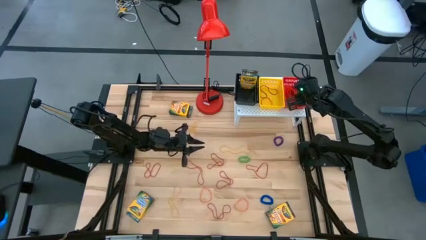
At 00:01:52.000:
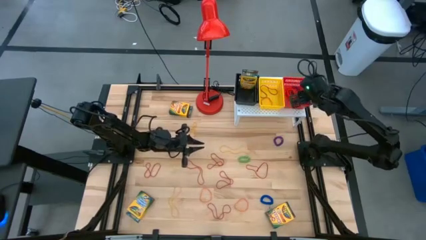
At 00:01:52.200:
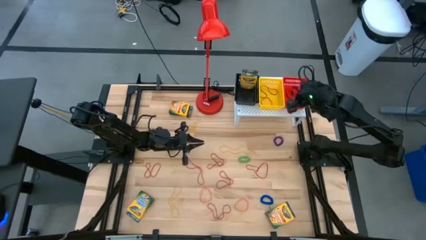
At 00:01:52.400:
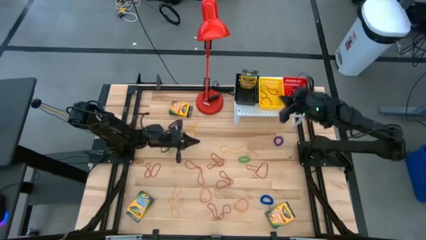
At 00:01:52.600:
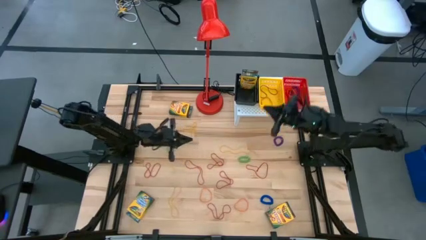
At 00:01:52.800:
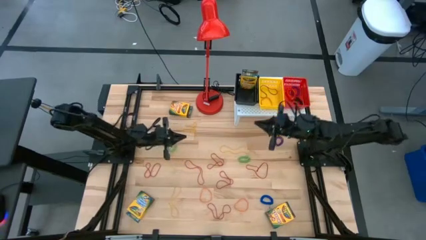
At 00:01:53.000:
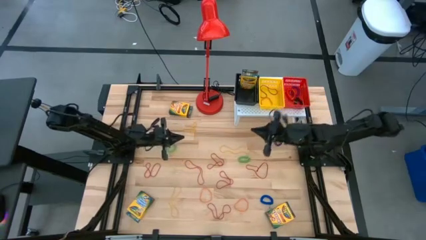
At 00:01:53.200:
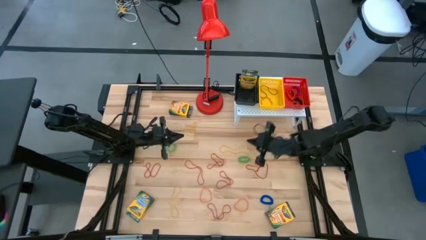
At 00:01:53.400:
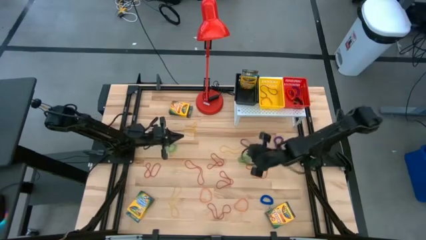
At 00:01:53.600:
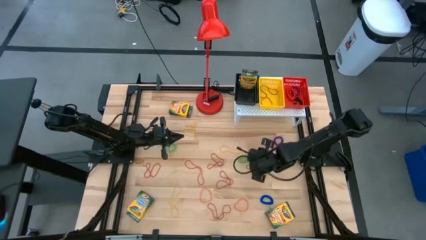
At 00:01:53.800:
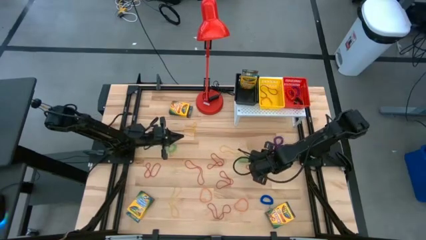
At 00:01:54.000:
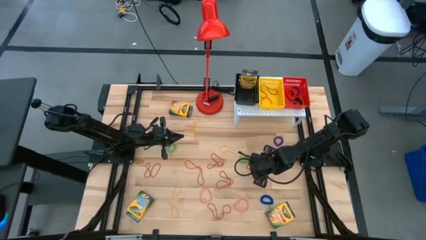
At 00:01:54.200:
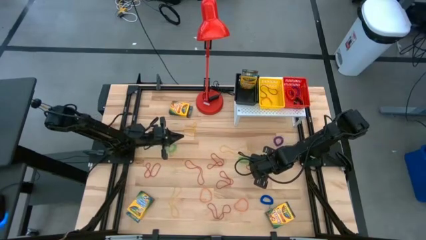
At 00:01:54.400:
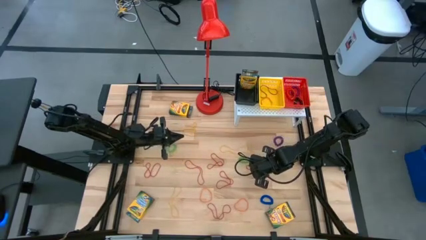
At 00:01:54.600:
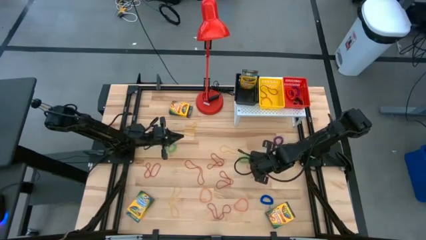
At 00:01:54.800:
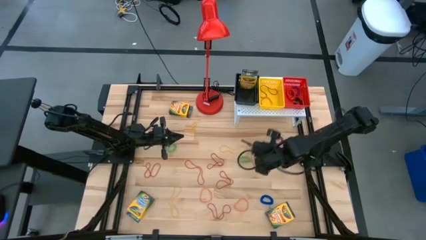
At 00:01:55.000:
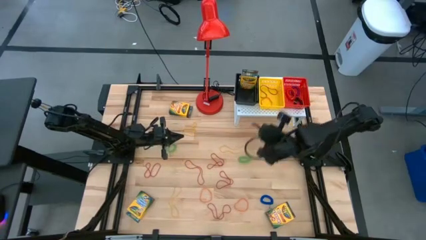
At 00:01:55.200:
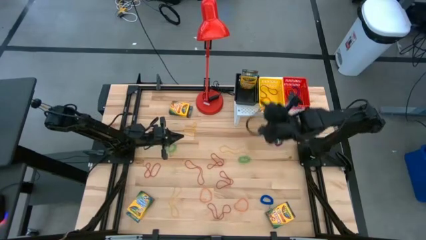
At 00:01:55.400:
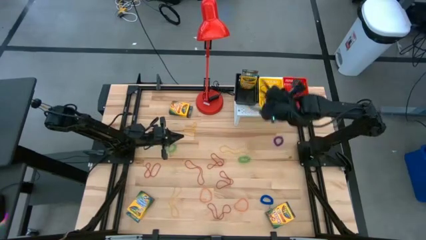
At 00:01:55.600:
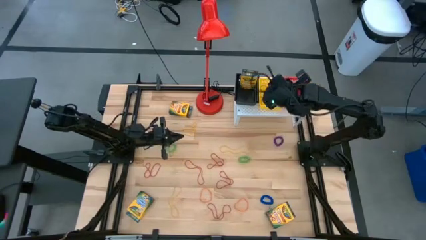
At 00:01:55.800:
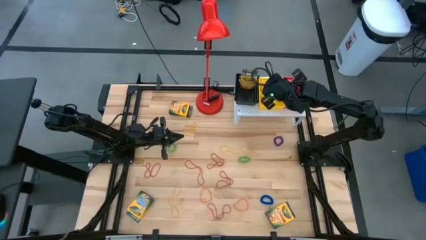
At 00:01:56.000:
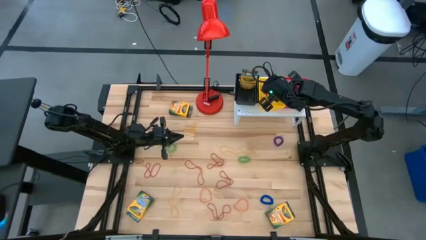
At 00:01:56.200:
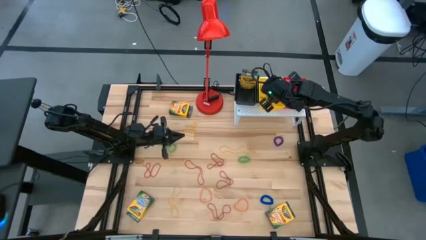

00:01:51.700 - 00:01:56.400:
Task: Pick & Place Office Desk Supplies
Put the red rubber band into the yellow bin

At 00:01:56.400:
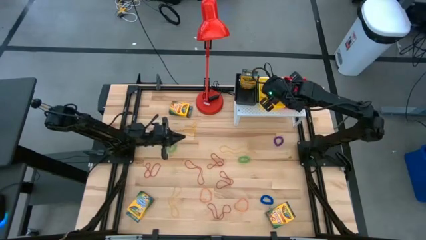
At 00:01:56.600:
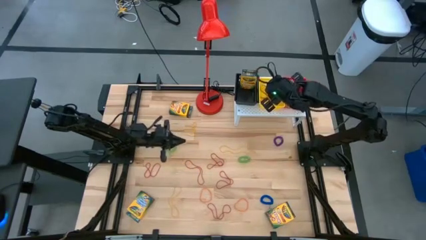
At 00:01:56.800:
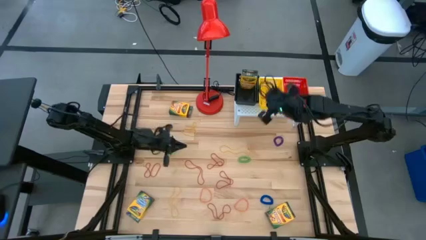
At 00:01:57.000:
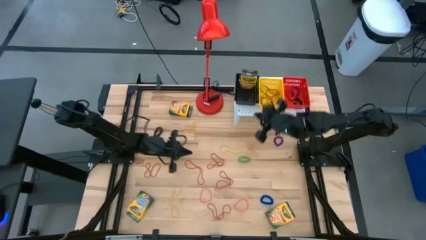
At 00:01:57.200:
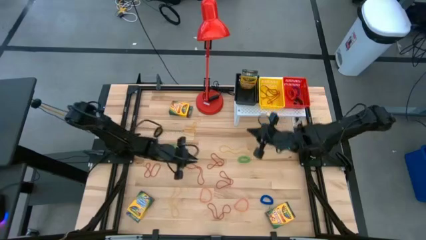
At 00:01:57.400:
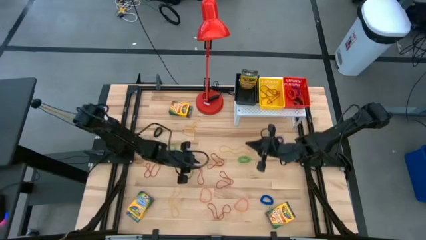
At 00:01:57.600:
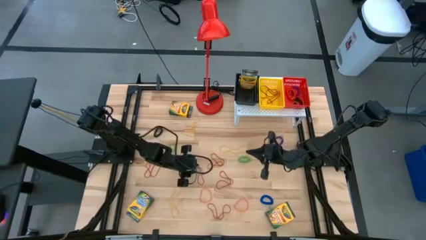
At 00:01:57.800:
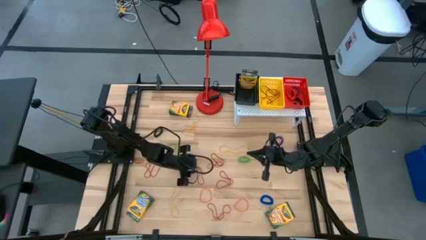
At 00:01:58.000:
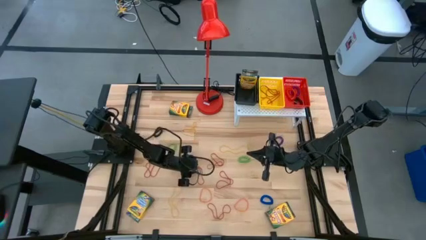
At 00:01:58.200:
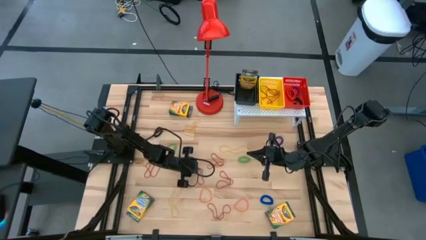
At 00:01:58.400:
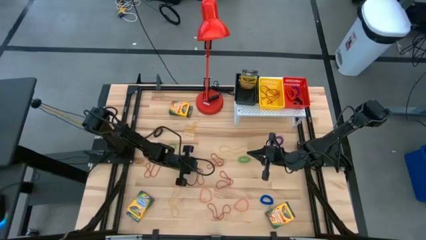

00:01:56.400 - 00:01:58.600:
Put the red rubber band into the yellow bin

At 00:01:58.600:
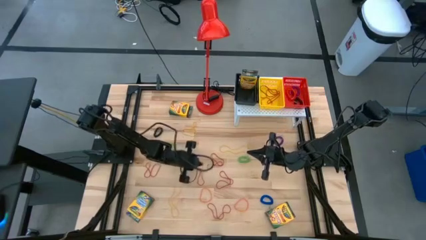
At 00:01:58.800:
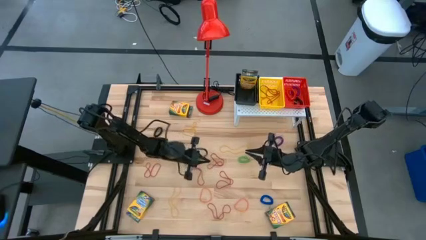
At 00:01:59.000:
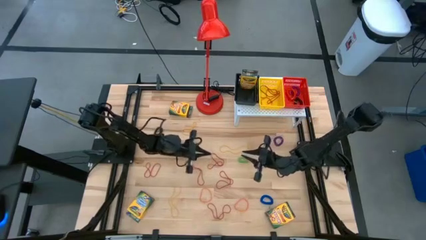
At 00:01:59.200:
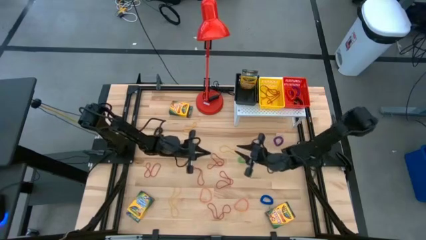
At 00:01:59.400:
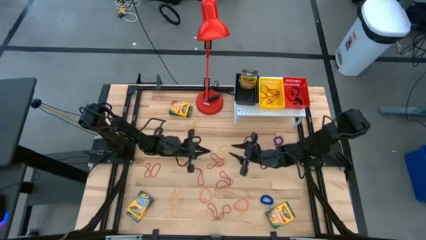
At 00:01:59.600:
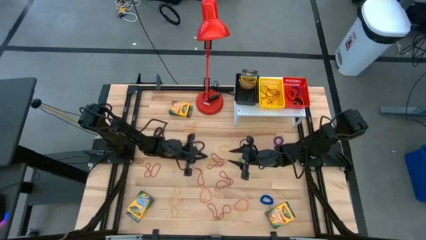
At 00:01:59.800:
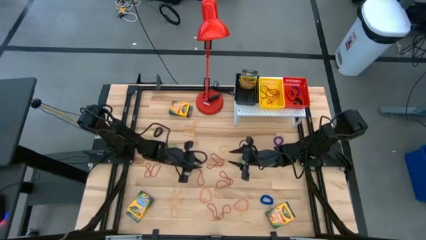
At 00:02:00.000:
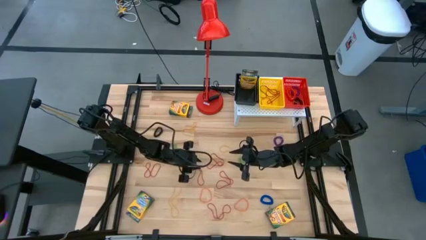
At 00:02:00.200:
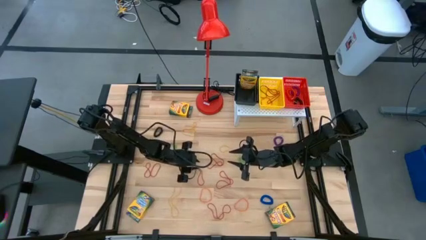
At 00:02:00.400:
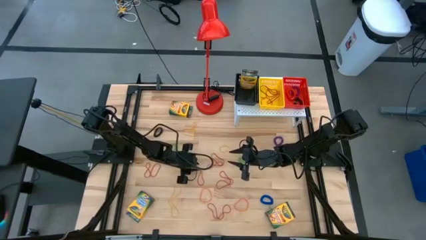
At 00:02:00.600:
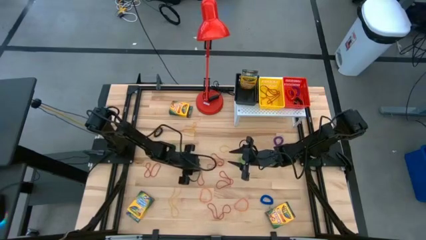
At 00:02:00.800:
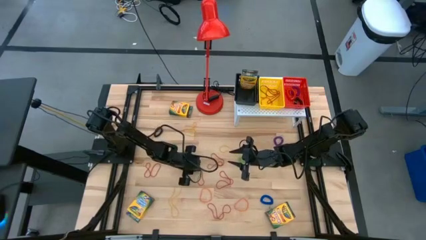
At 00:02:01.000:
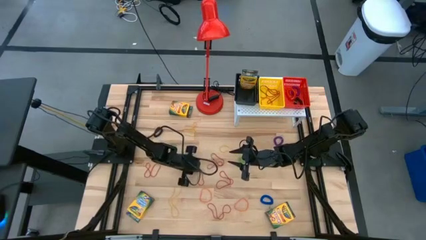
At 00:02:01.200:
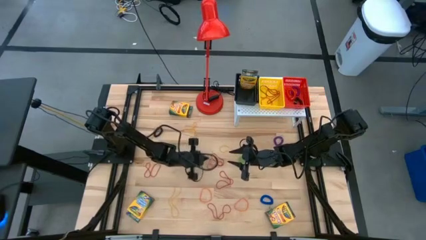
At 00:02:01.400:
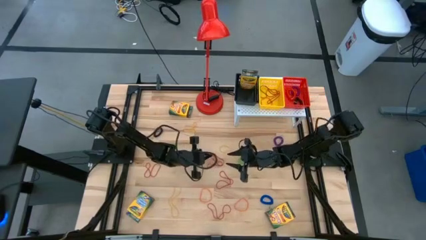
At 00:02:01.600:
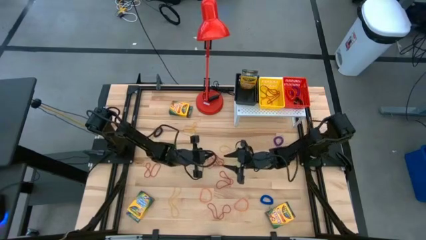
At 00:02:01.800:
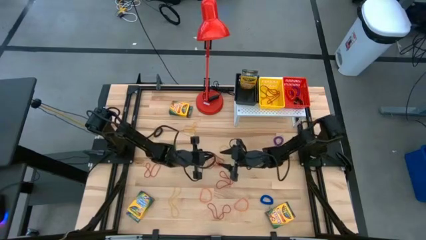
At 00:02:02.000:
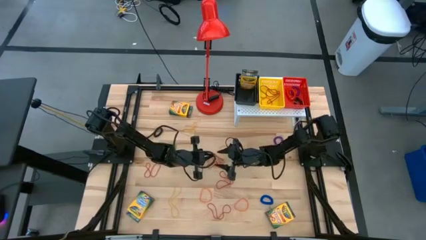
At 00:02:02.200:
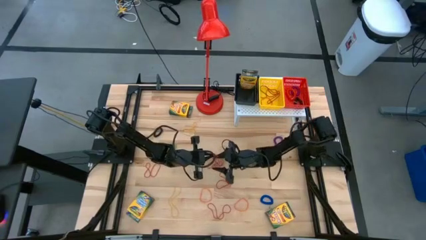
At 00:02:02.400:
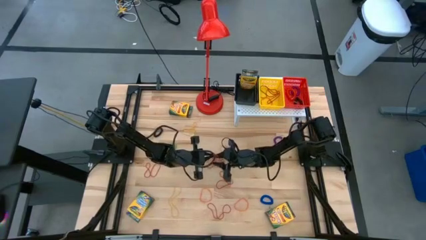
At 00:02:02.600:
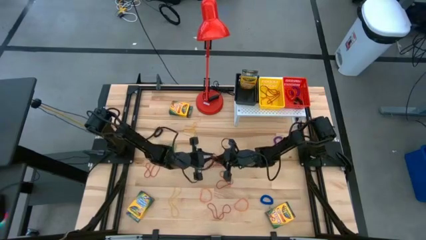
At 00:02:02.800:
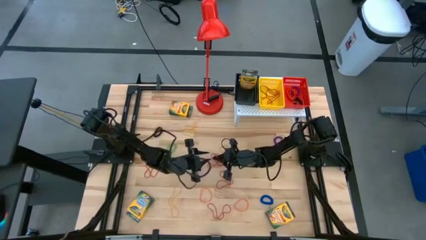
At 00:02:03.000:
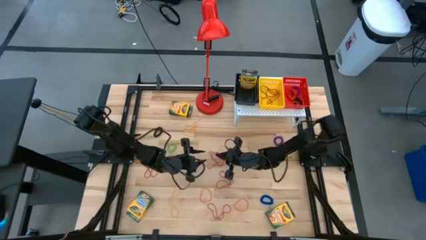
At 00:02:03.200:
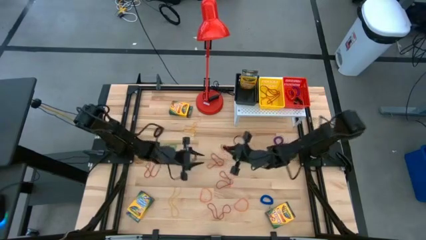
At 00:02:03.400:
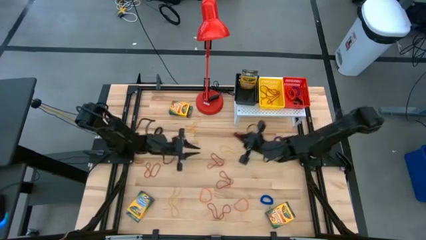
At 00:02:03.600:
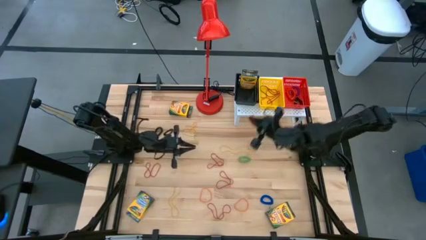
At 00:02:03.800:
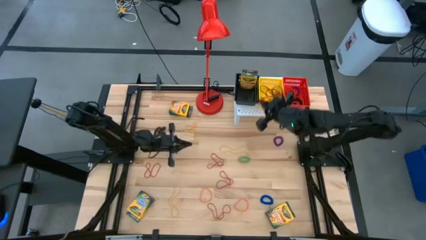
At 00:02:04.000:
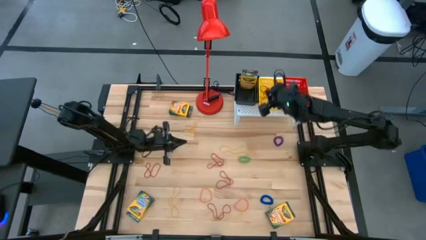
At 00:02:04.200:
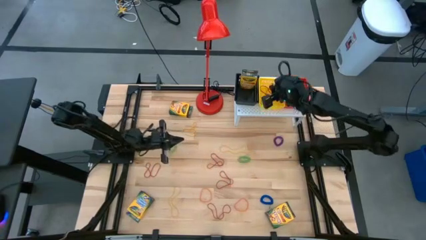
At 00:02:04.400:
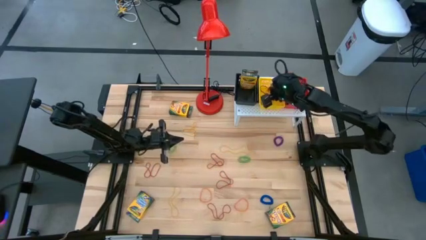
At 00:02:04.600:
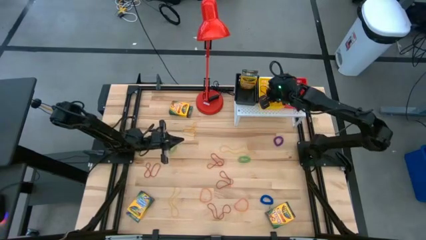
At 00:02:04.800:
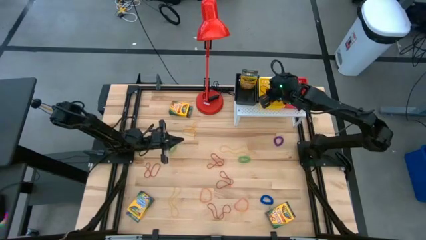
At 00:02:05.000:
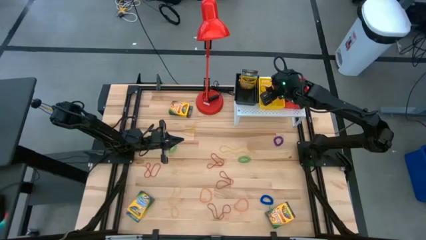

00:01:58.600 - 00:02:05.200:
Put the red rubber band into the yellow bin
